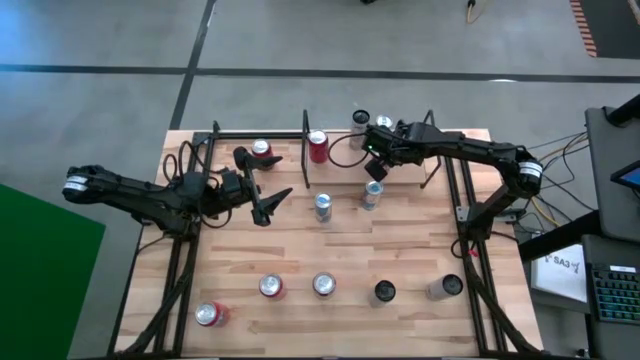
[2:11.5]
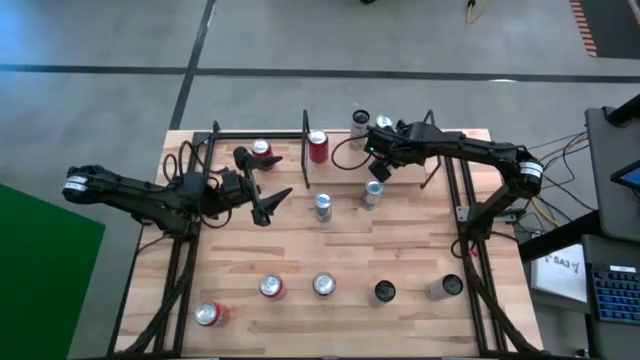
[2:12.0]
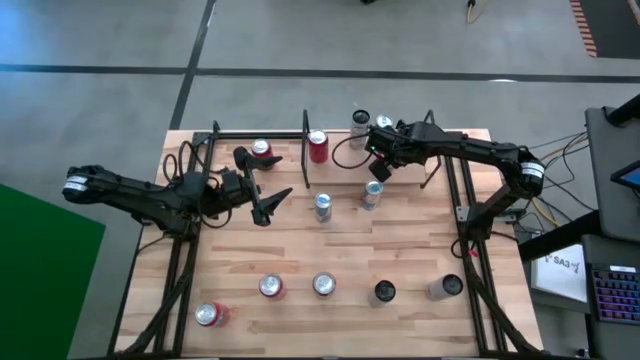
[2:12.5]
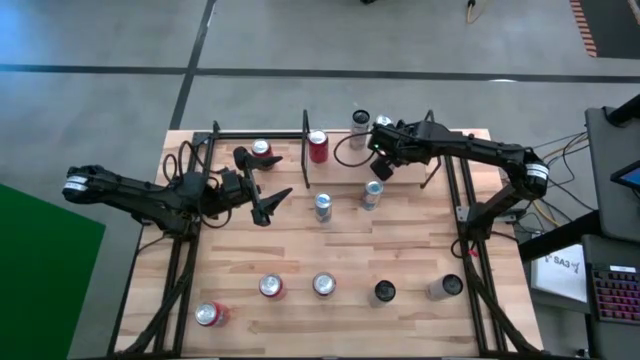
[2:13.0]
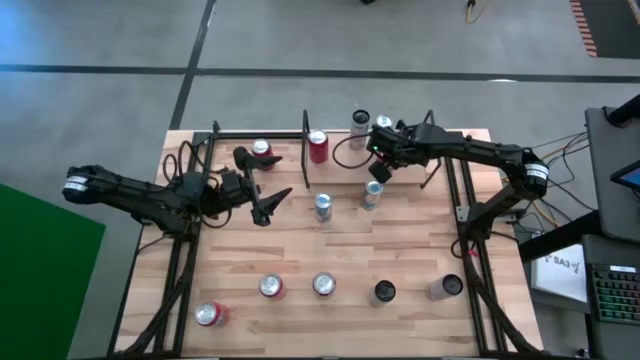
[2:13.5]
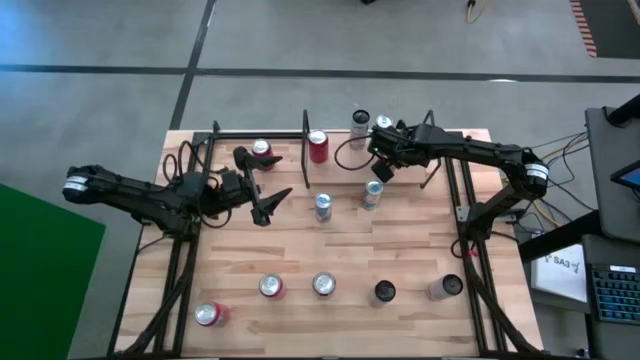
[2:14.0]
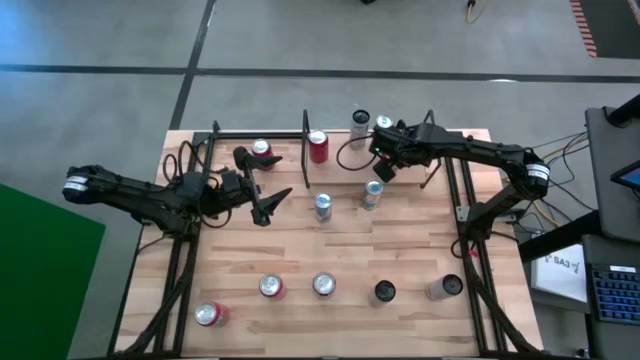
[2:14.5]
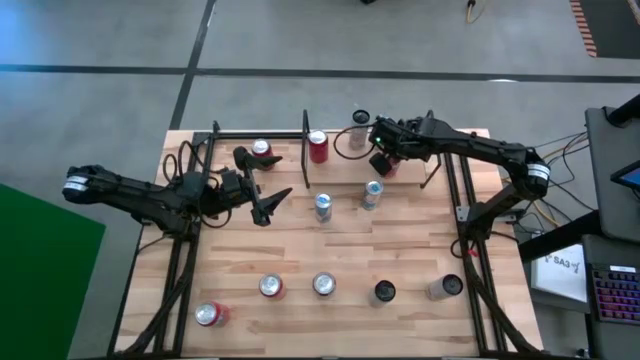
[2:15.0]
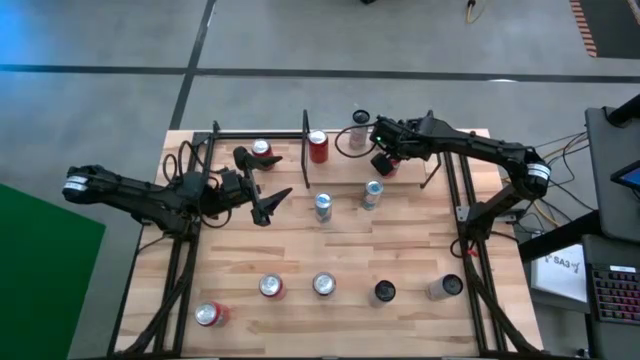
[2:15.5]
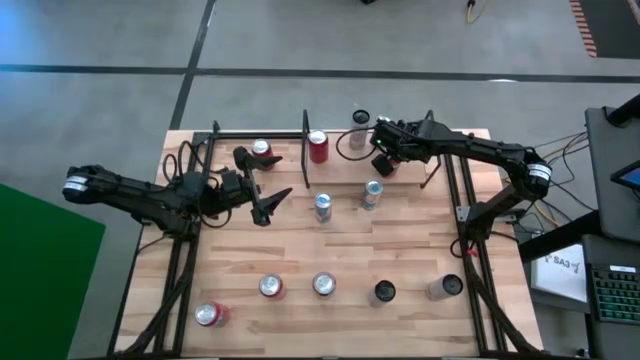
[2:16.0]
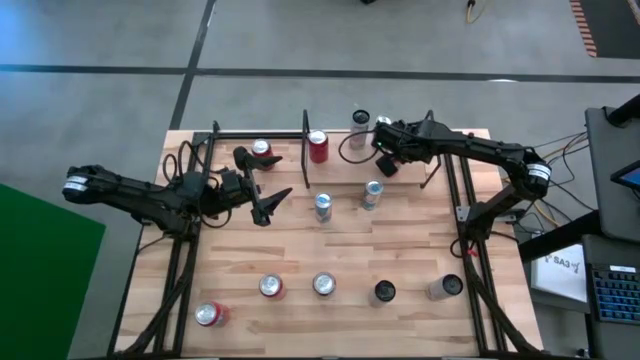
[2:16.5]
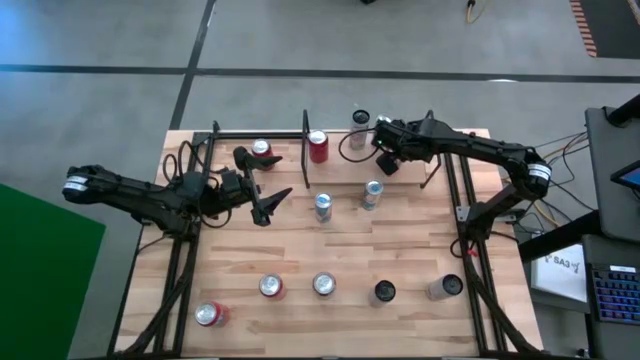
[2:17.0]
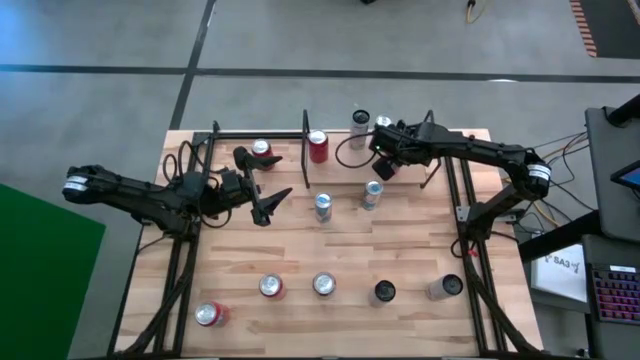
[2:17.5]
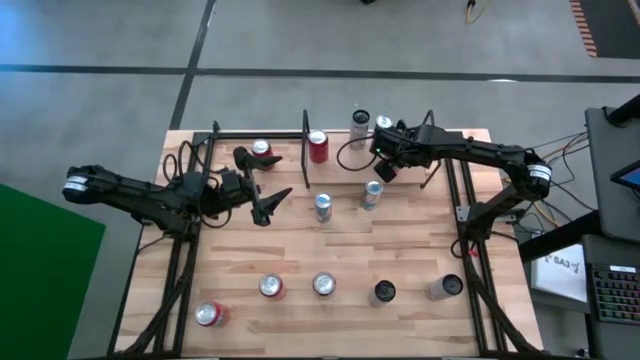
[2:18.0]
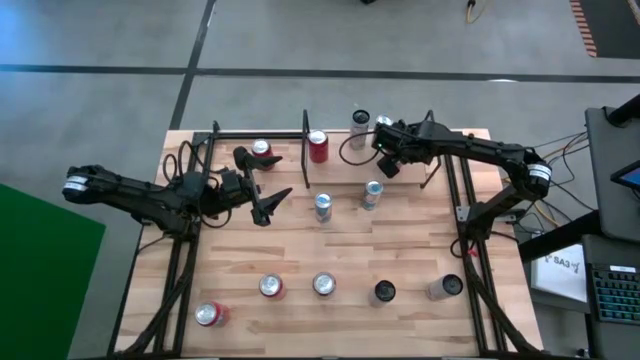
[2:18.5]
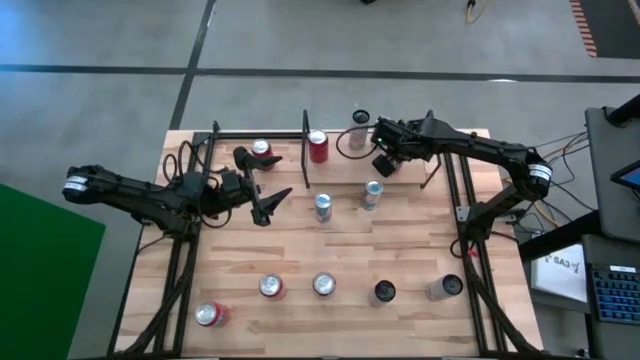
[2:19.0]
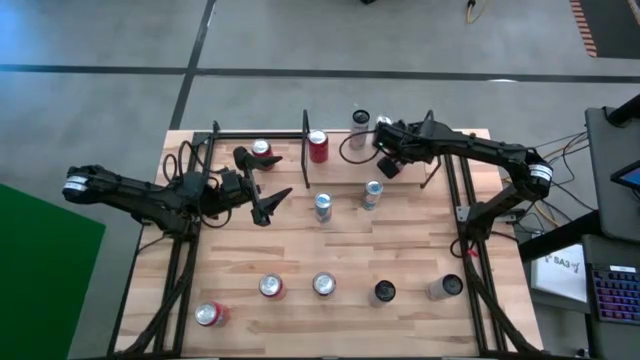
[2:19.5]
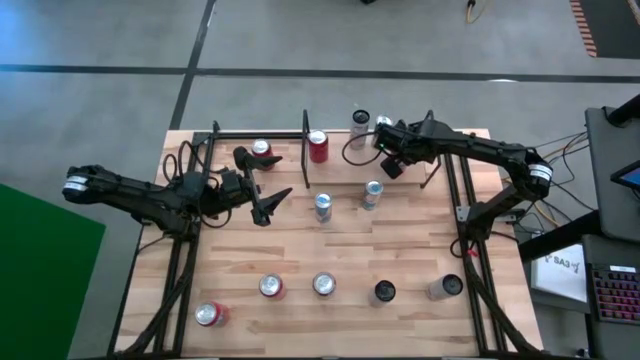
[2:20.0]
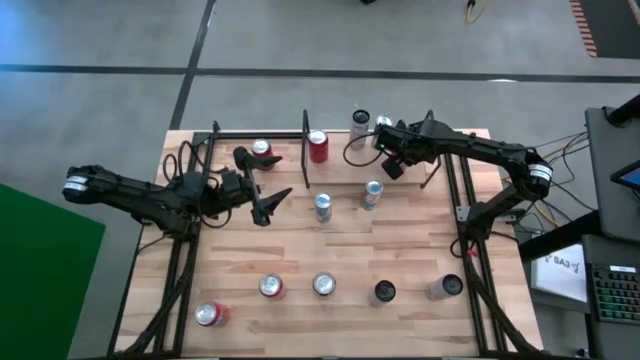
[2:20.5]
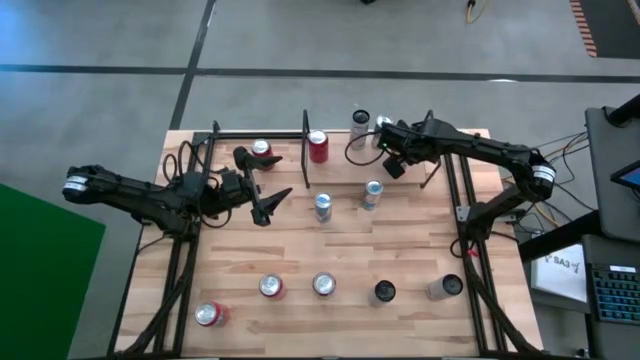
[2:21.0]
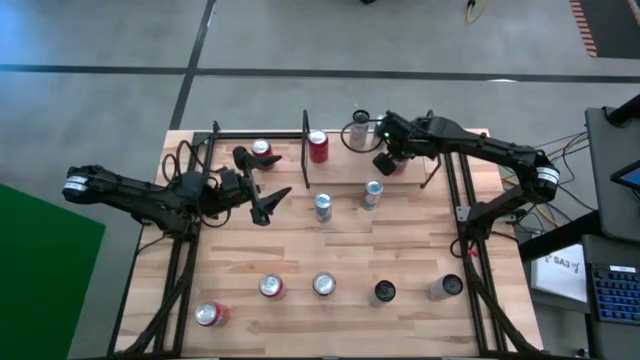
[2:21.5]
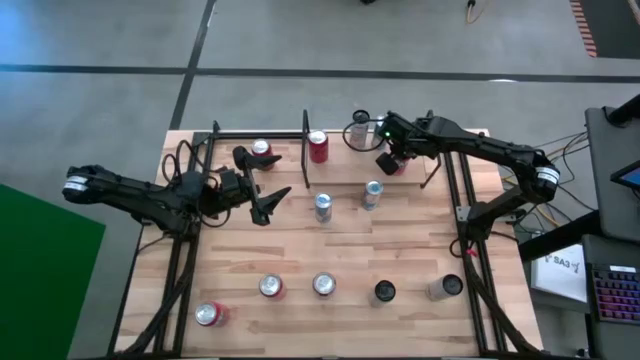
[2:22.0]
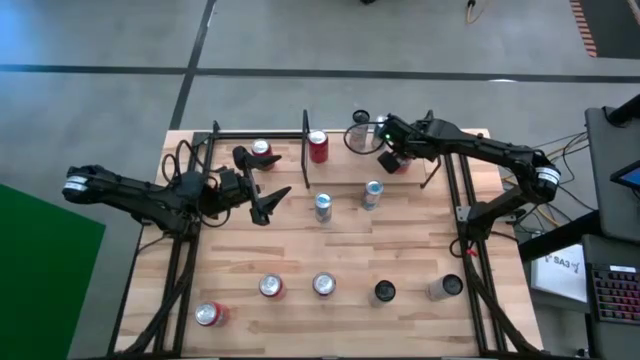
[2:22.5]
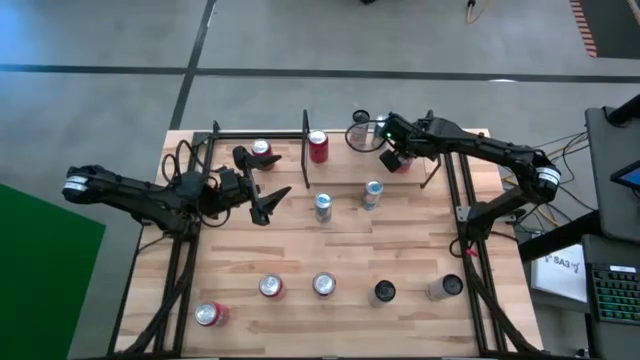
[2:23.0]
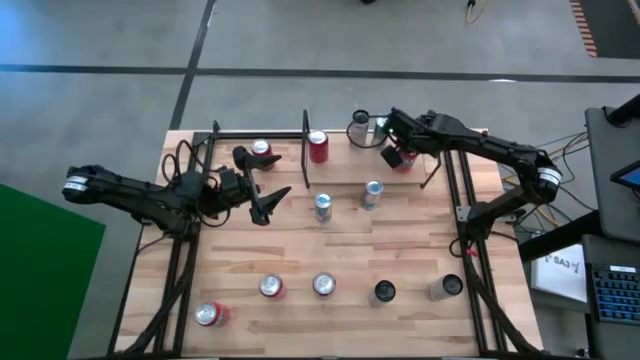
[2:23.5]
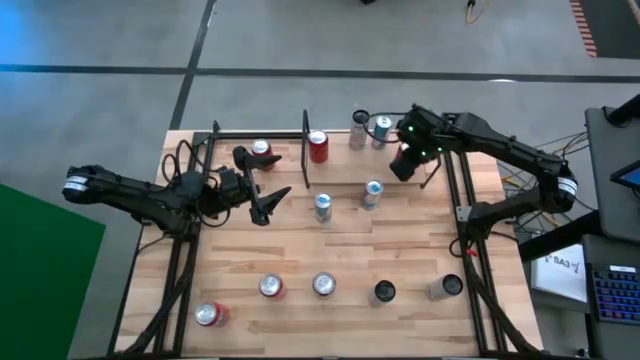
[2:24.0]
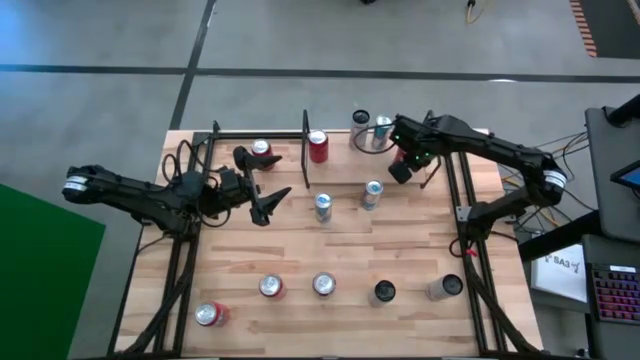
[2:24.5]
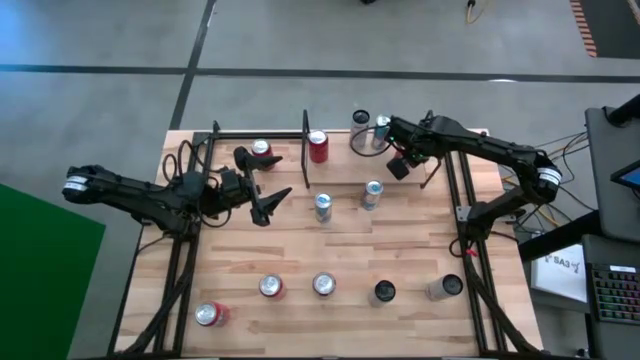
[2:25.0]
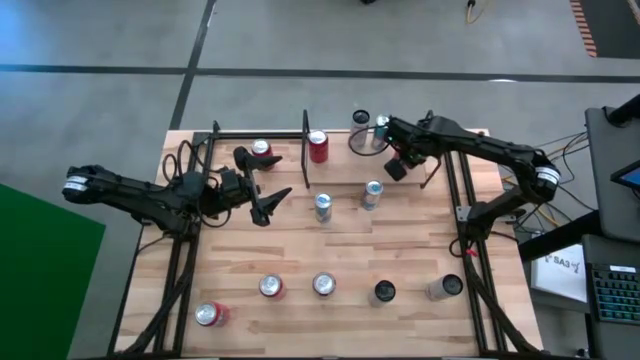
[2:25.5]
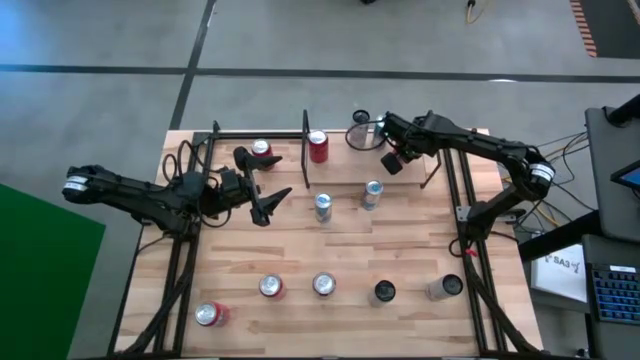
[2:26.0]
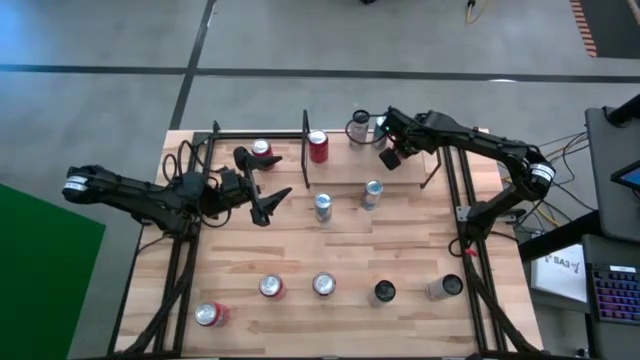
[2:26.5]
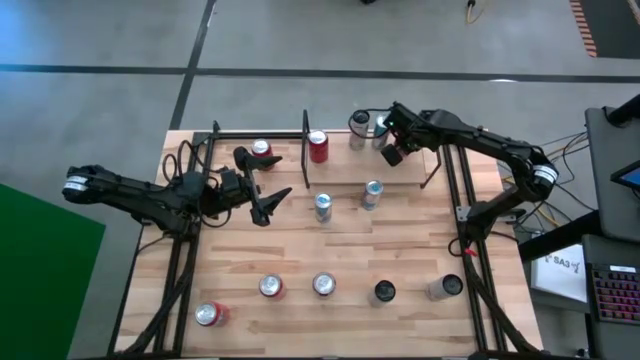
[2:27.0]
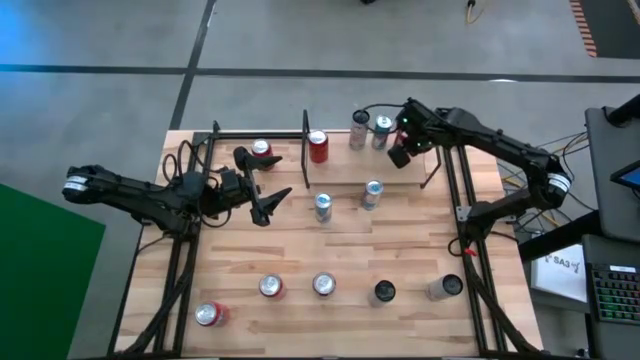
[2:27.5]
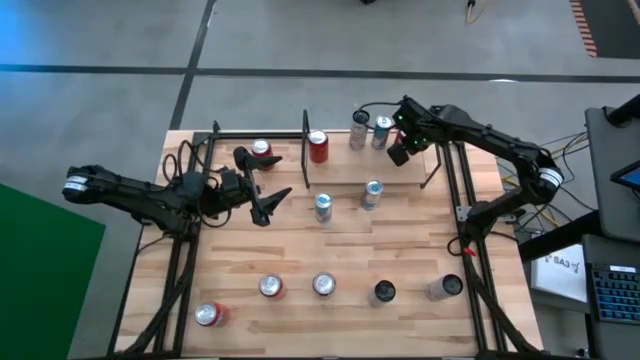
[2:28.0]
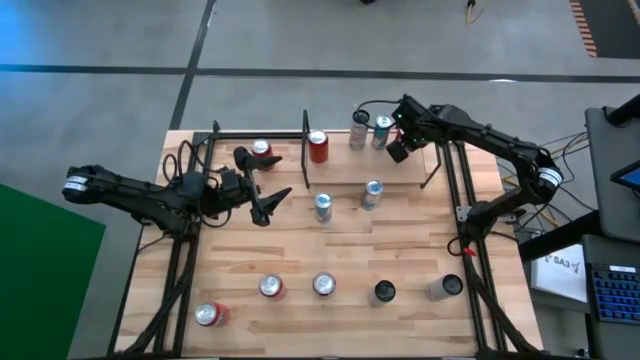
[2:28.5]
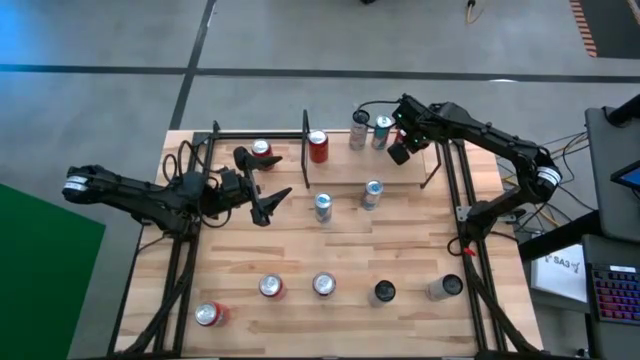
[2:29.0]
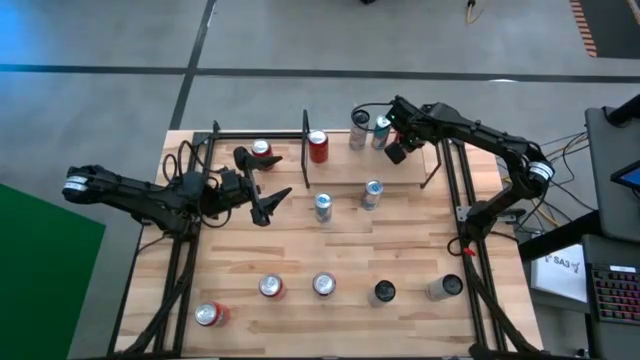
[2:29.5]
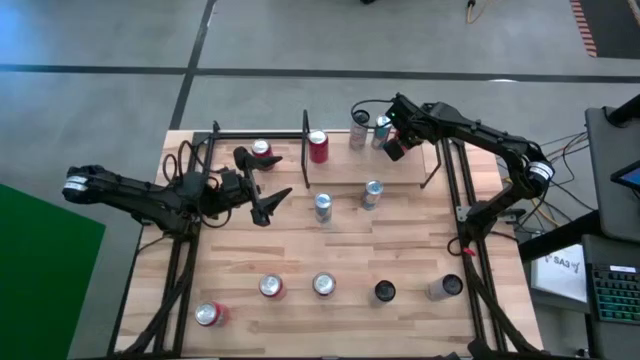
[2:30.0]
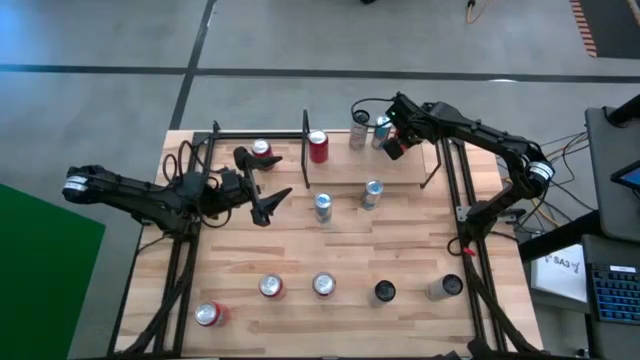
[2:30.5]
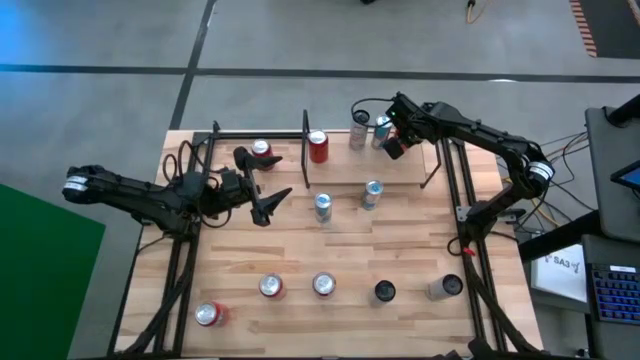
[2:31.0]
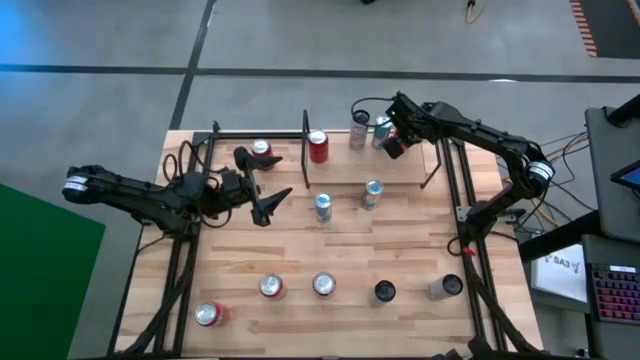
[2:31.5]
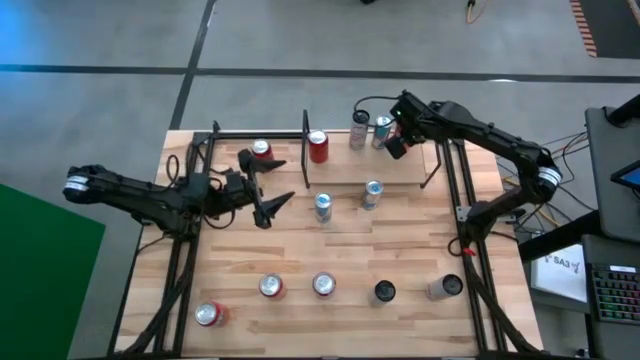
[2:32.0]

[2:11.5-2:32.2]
Task: Place canned beverage on shelf
Put the red soda can on the shelf
